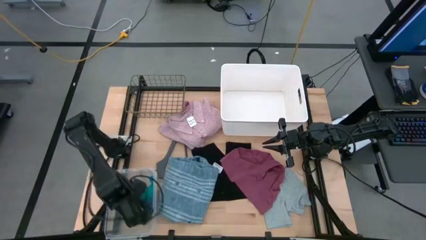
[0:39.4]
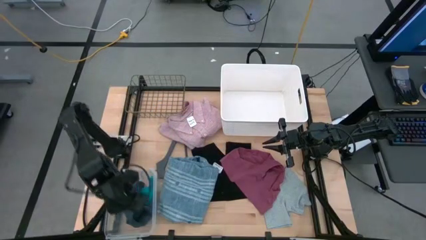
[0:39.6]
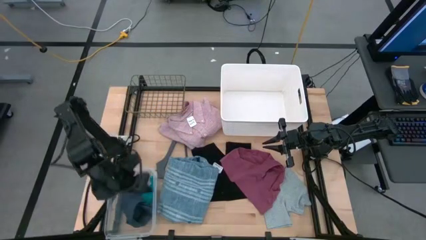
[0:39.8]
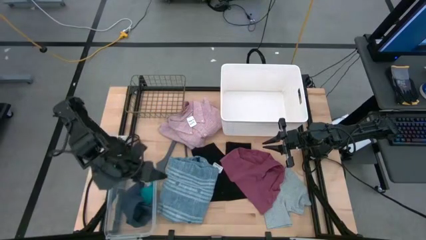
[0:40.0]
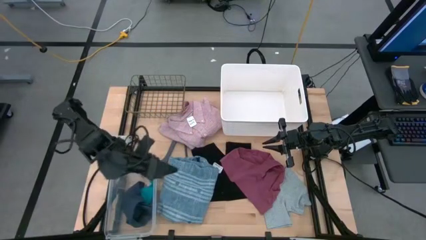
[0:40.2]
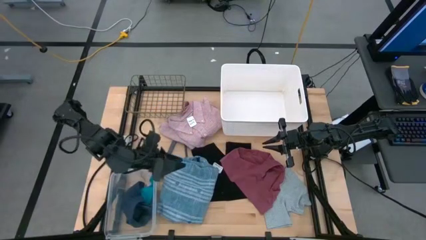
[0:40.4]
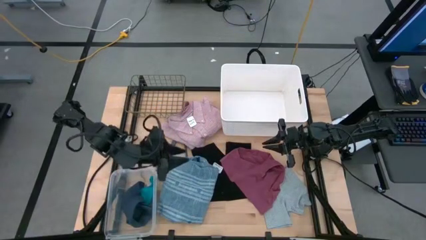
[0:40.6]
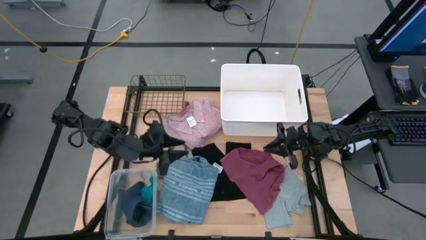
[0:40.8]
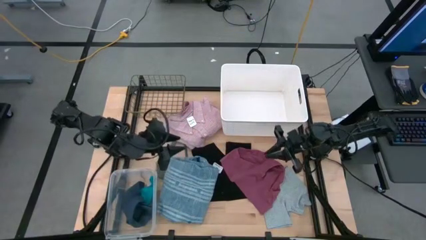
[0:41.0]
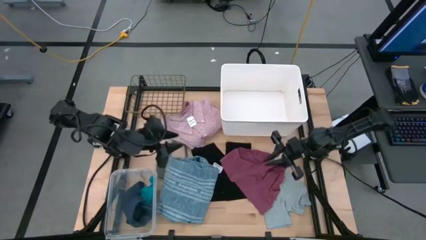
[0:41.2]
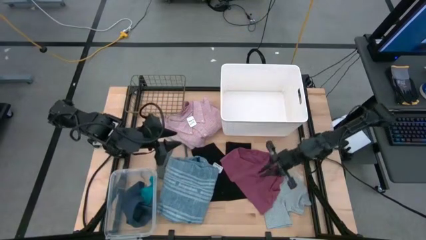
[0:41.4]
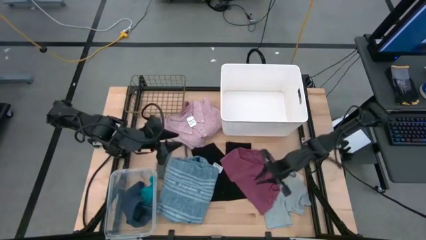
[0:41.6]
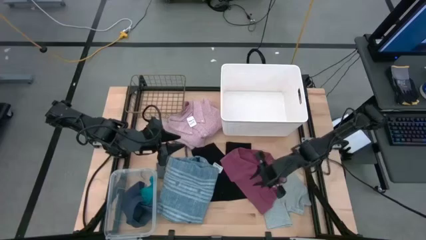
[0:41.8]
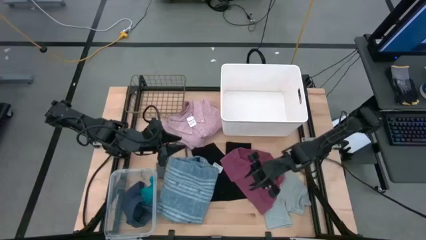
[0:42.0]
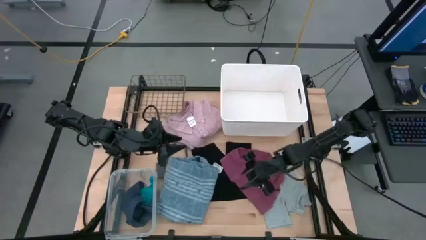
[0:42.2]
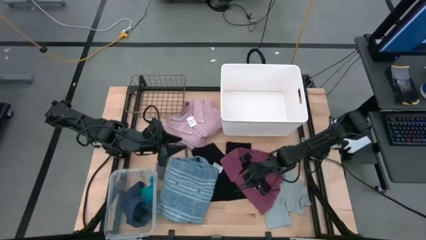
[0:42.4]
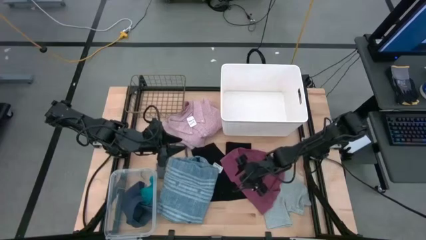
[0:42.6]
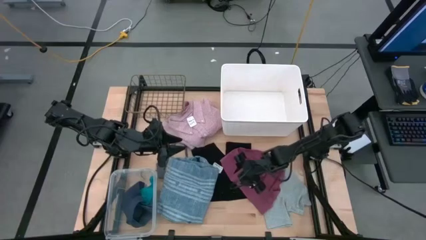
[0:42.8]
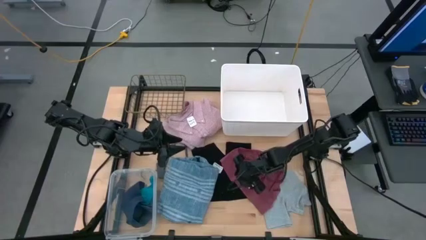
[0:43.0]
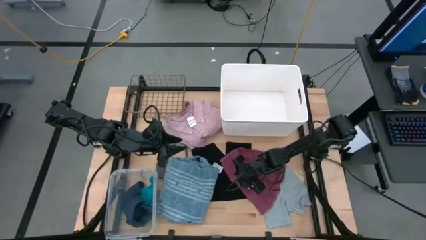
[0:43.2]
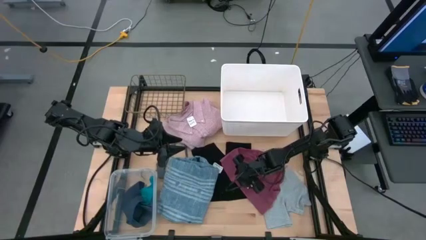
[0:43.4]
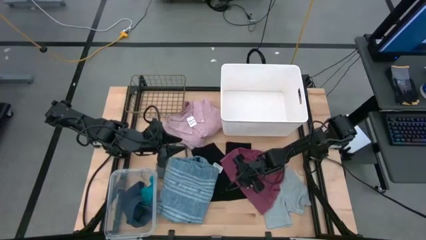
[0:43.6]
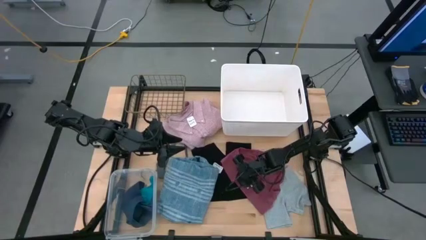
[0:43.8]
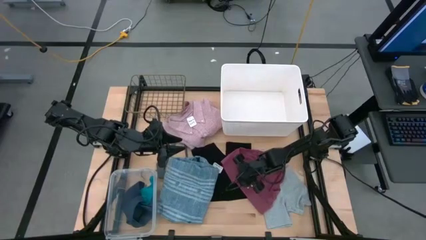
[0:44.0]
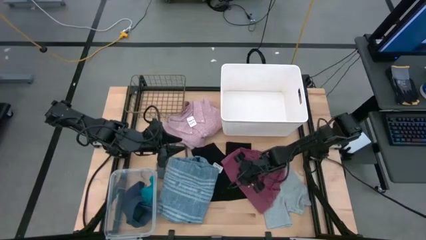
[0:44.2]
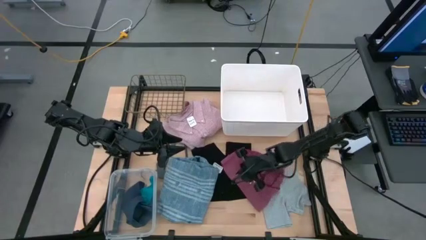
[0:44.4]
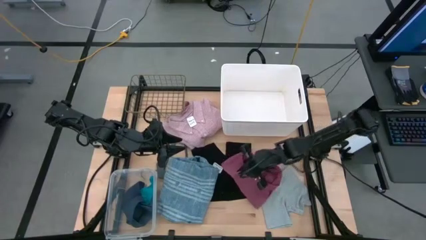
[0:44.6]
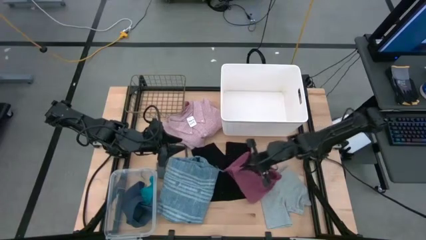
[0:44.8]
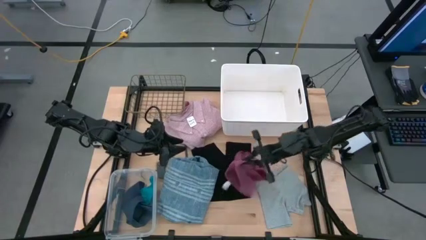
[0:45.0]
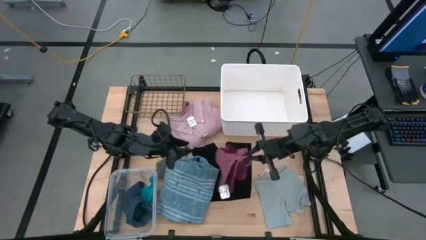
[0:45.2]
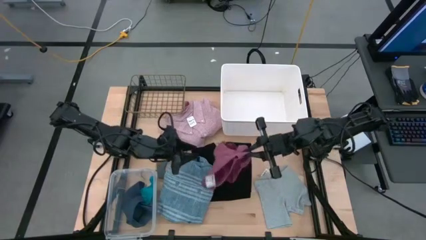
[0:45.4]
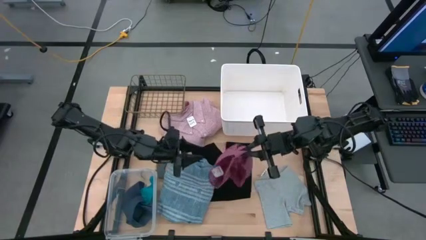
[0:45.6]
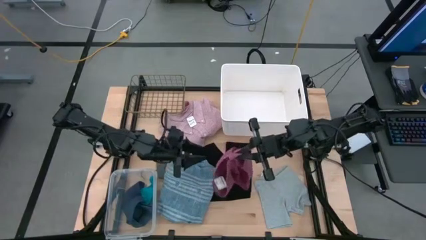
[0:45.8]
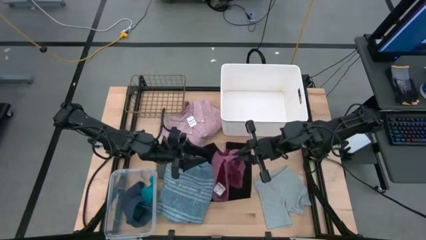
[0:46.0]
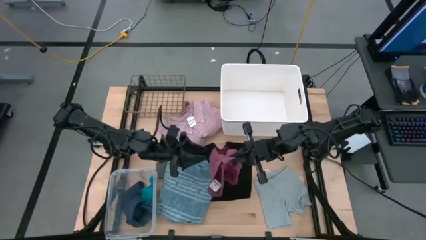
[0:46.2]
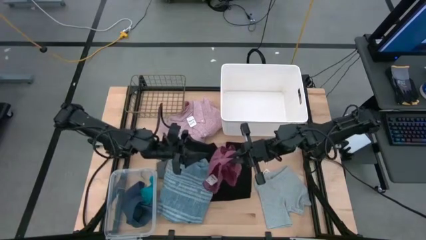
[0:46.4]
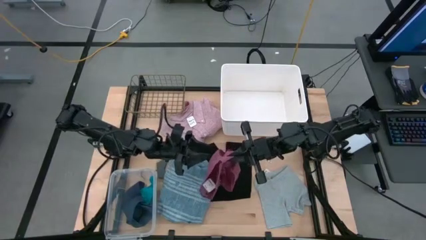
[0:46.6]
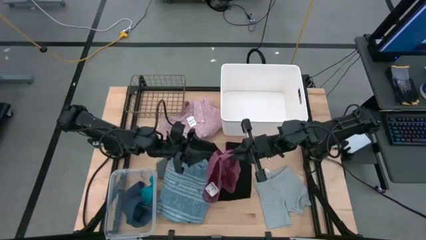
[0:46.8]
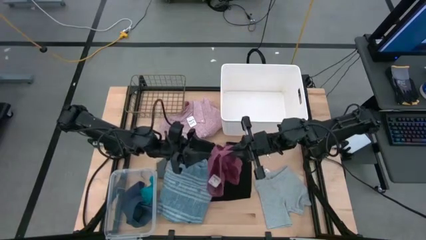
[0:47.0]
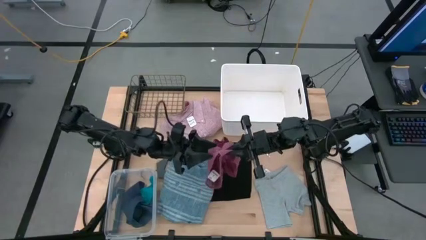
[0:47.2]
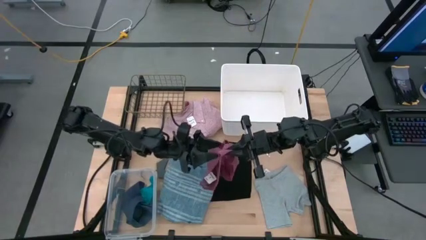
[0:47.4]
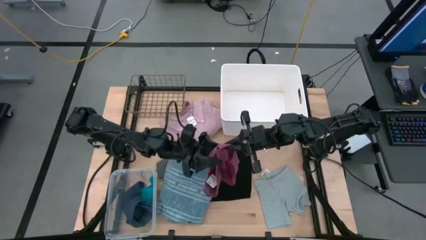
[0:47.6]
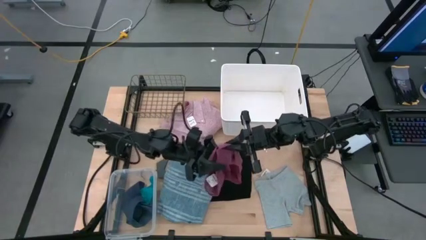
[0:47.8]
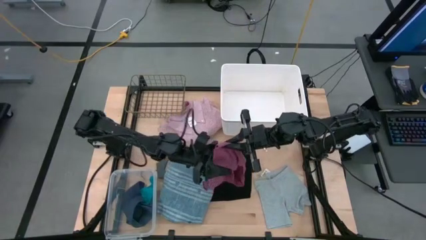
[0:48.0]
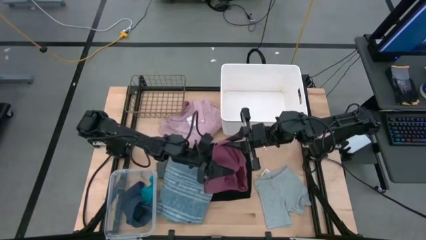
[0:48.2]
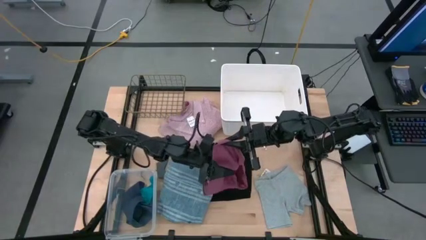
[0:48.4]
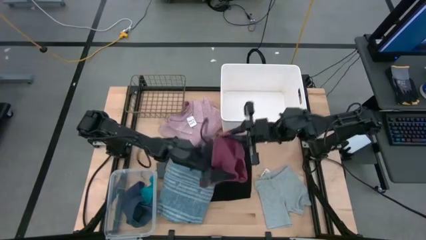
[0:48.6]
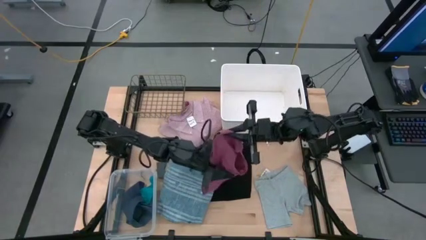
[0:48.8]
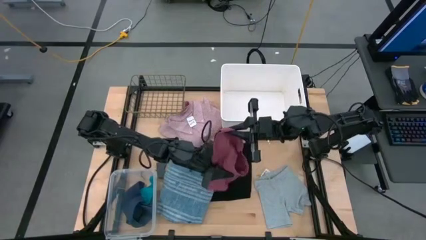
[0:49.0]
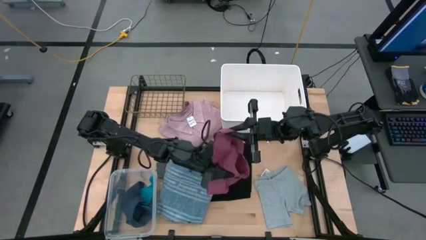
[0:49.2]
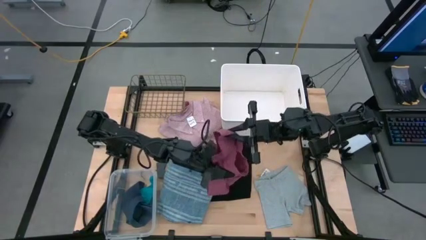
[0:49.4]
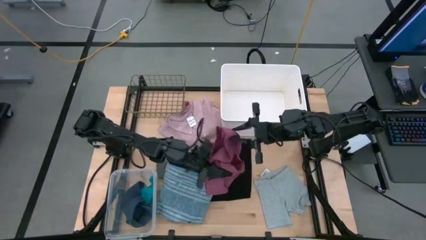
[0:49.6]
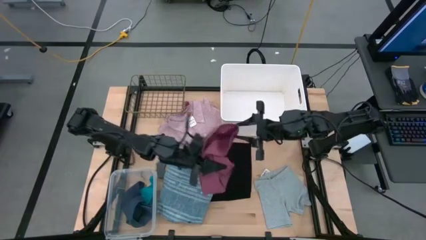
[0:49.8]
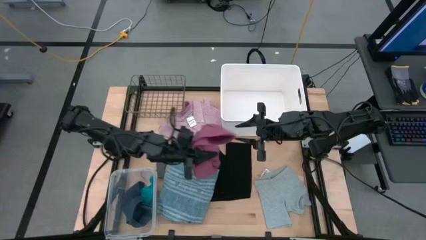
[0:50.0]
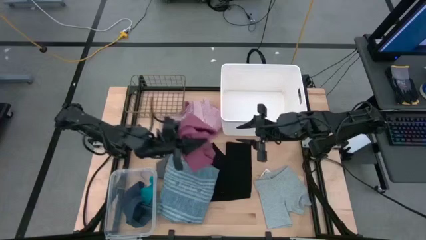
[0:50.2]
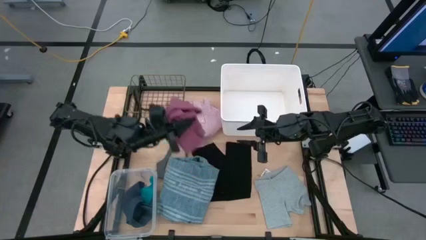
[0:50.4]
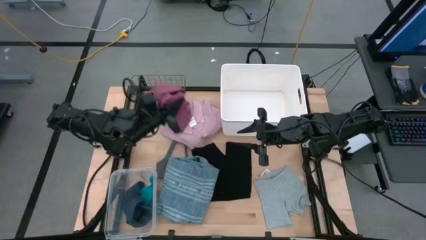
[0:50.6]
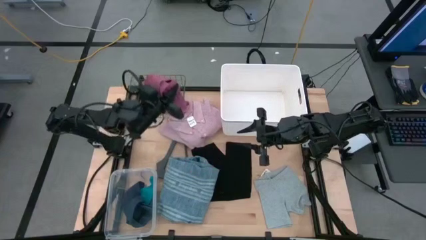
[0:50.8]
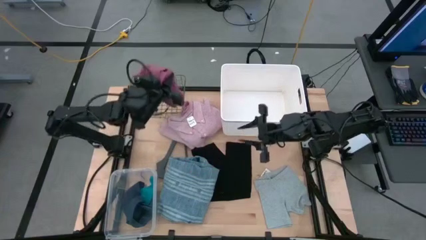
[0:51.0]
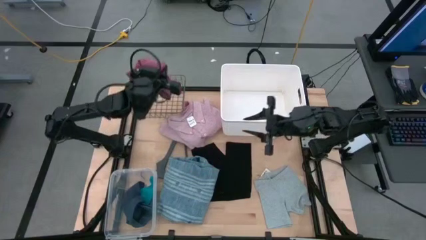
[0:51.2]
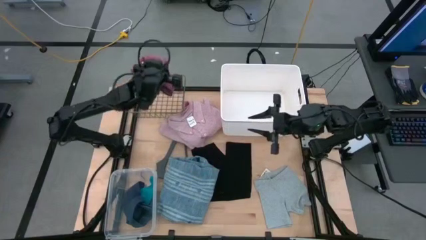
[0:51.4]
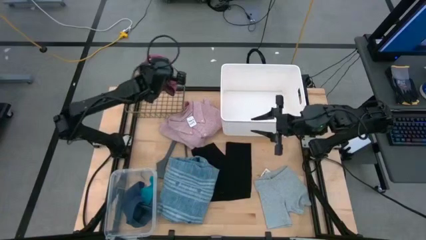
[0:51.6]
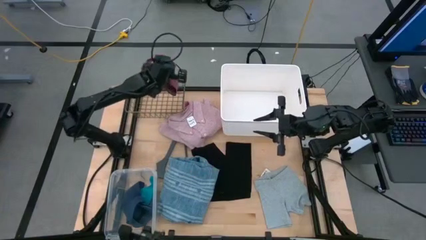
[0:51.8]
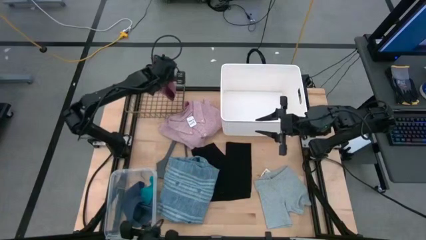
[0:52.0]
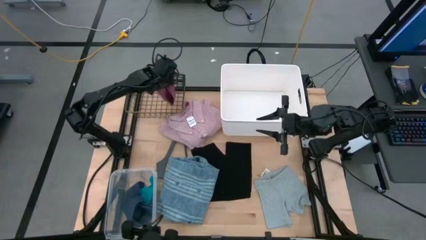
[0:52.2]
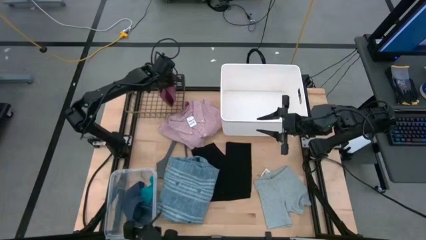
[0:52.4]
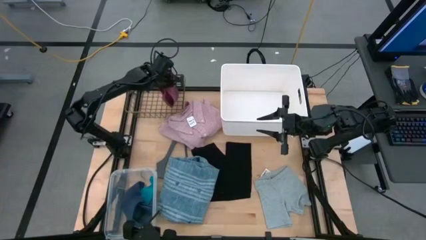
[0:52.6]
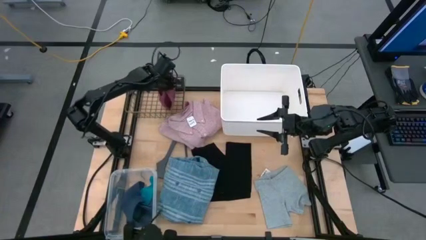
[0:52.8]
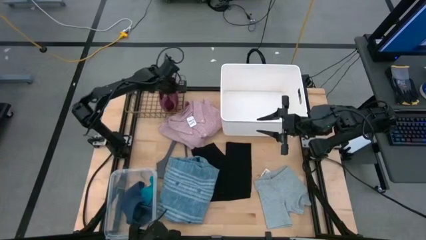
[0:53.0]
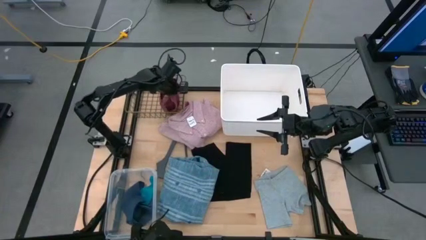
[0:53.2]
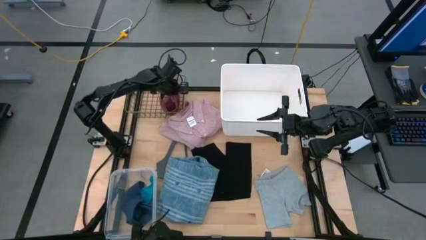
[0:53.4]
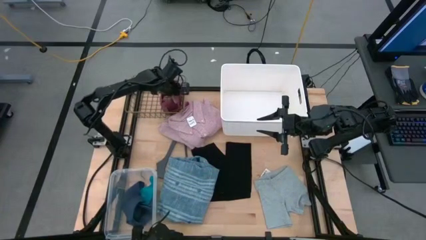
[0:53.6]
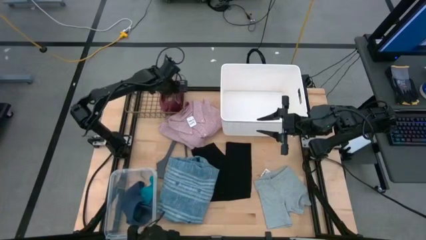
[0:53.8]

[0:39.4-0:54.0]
Task: Pick & Place Cloths
Put the pink underwear into the gold wire basket
